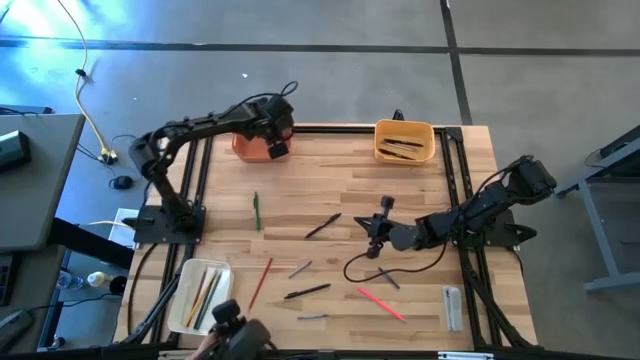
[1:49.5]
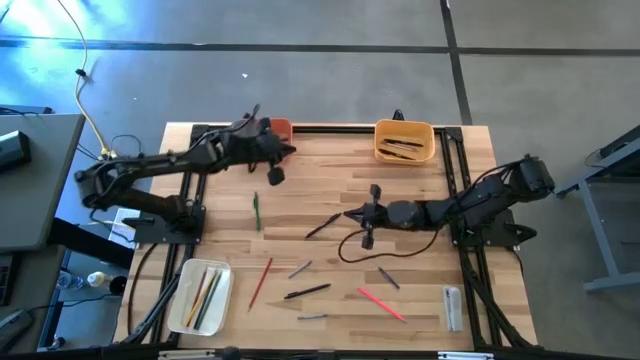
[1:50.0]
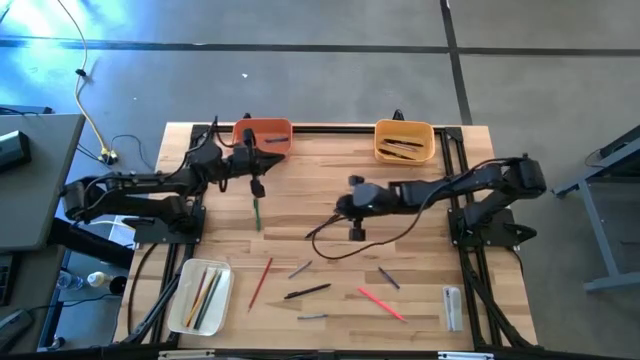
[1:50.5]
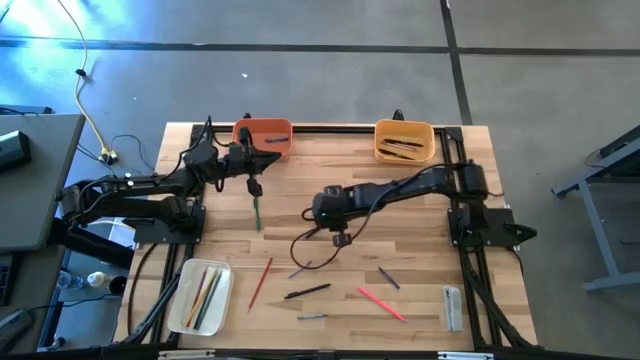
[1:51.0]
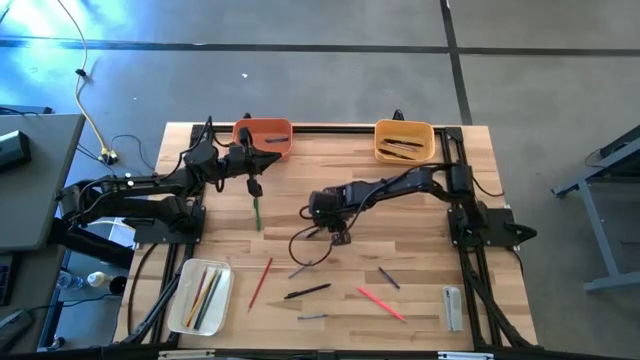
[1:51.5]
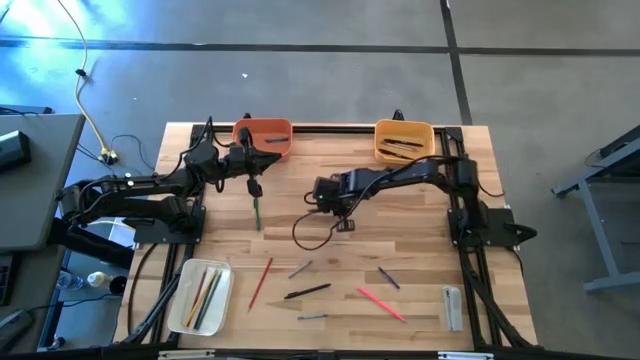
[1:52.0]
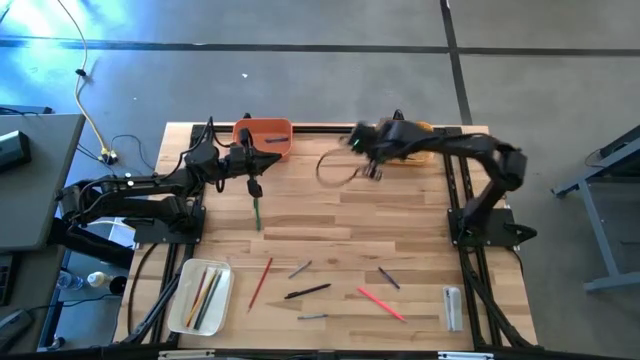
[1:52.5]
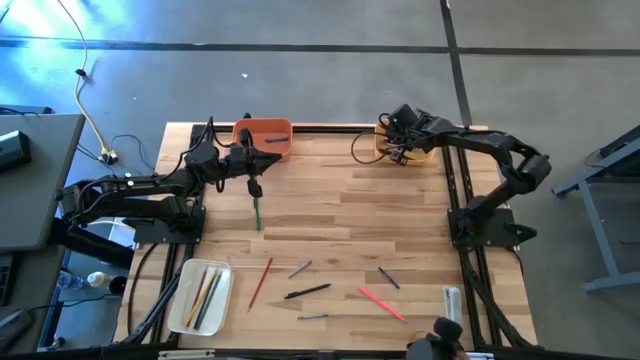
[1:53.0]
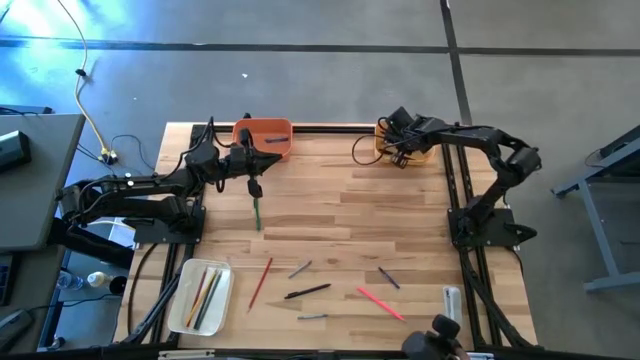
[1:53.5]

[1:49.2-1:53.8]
Task: Sort crayons/erasers/pens/pencils in bins
Put the black pen into the yellow bin

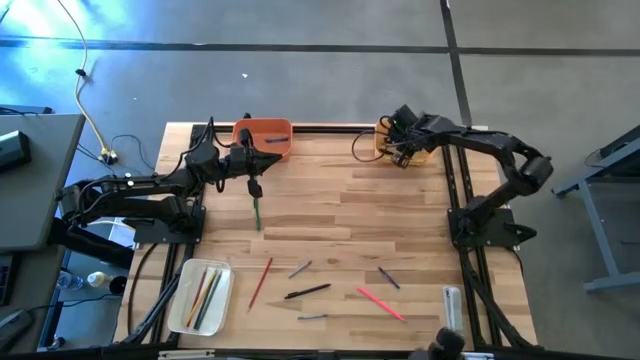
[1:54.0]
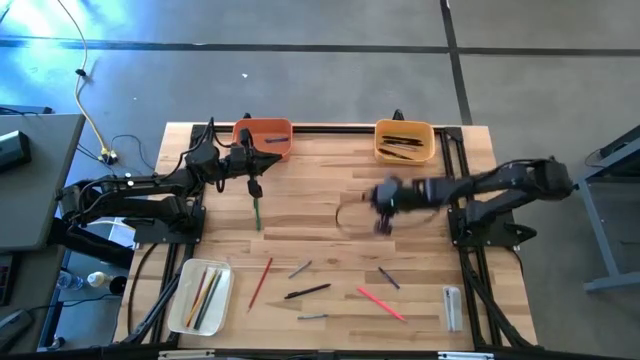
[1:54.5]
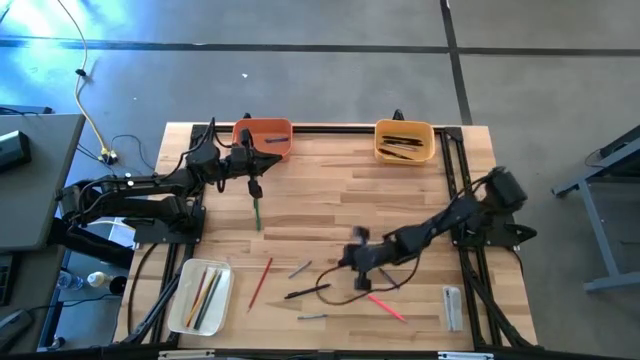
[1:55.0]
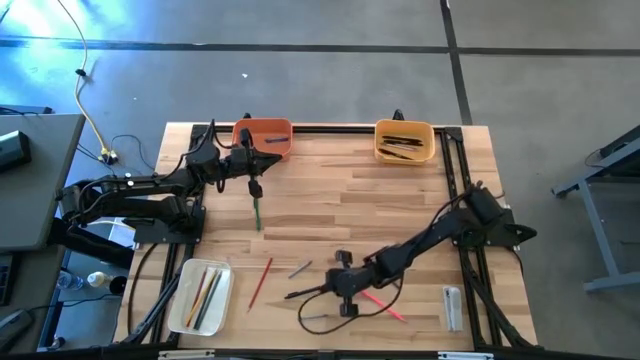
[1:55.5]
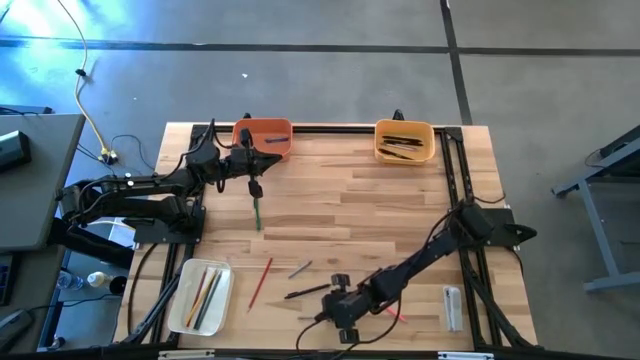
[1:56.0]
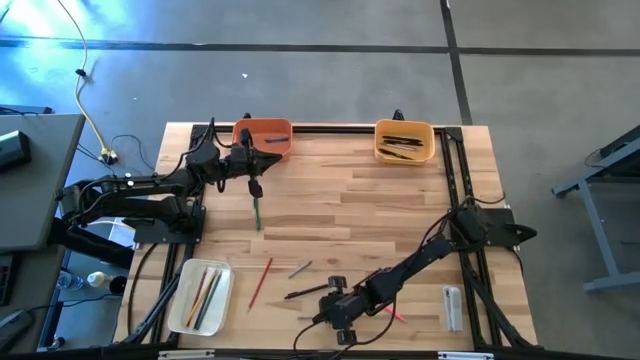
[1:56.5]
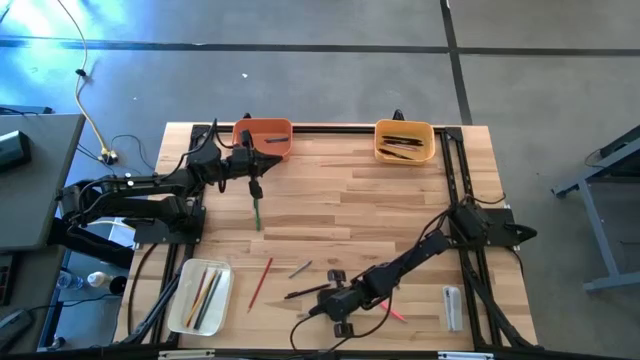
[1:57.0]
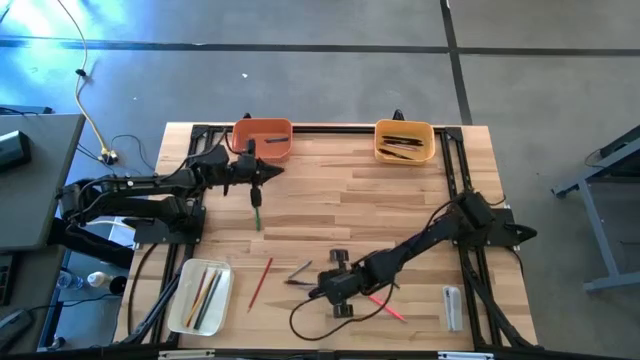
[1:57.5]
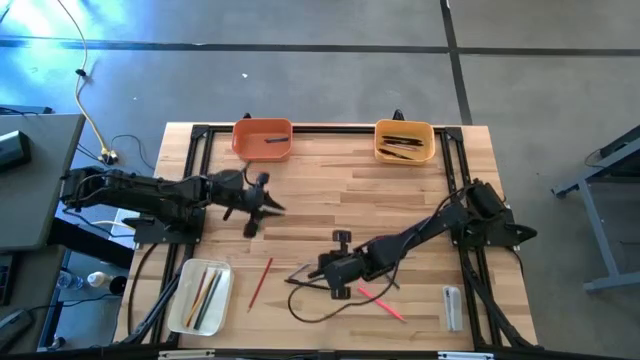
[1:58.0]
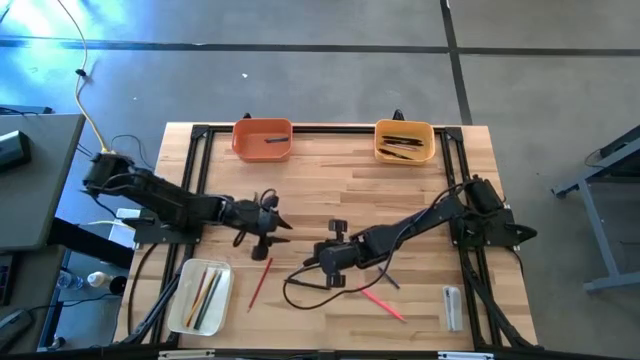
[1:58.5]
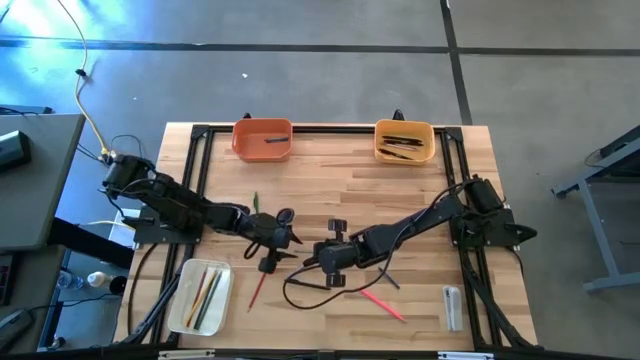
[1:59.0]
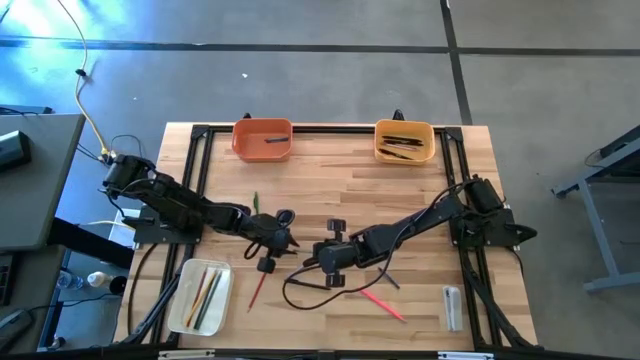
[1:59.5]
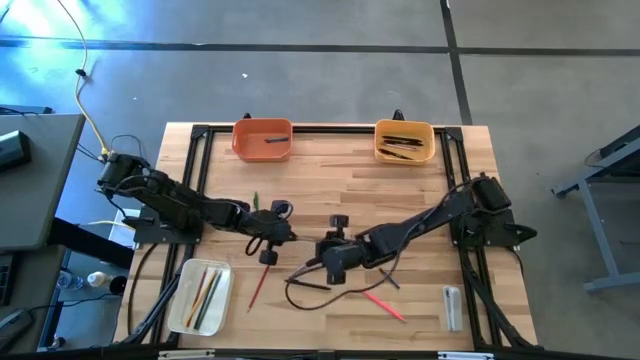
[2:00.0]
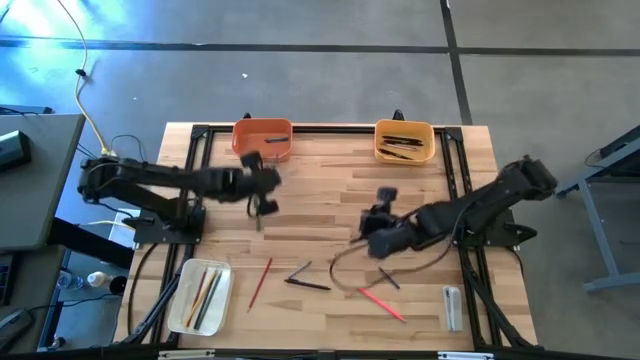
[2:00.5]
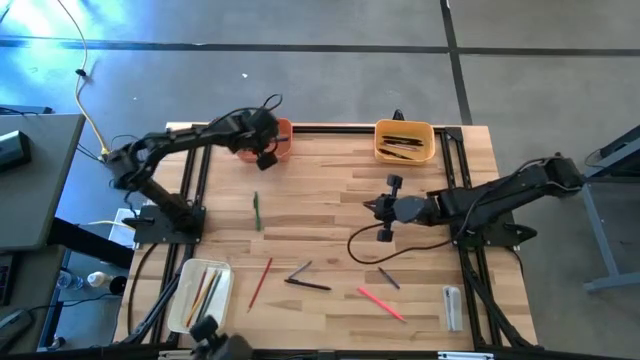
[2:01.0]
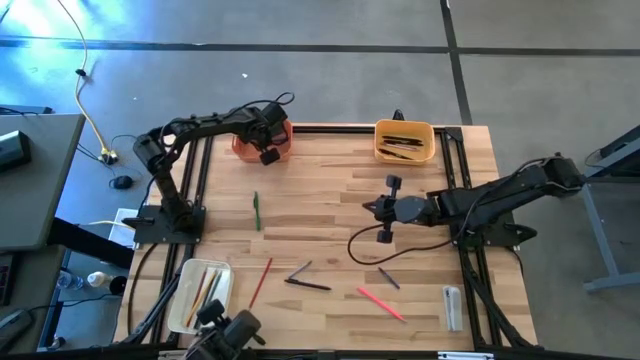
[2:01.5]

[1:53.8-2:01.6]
Put the gray crayon into the orange bin

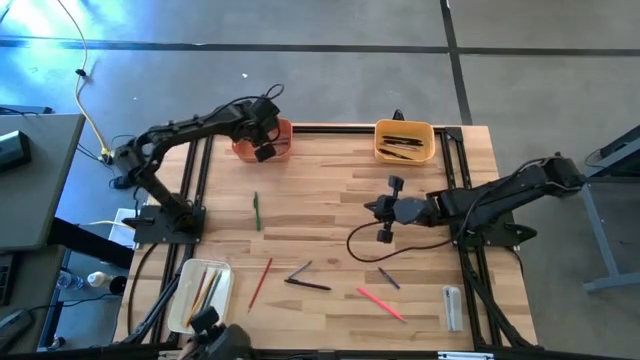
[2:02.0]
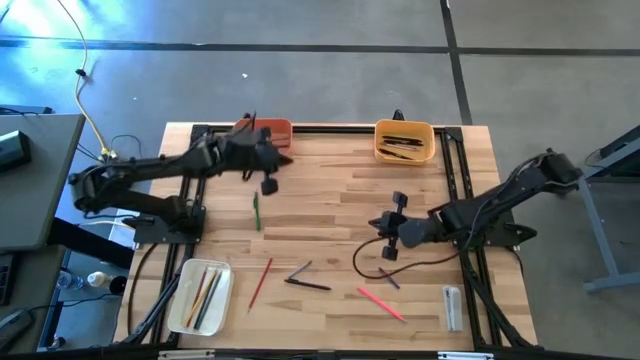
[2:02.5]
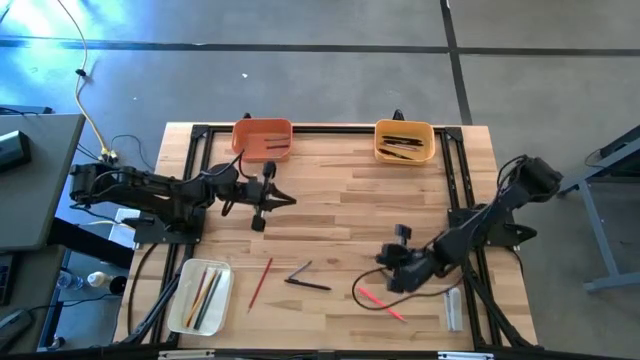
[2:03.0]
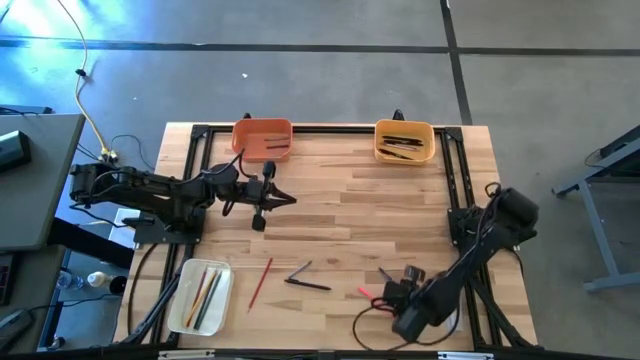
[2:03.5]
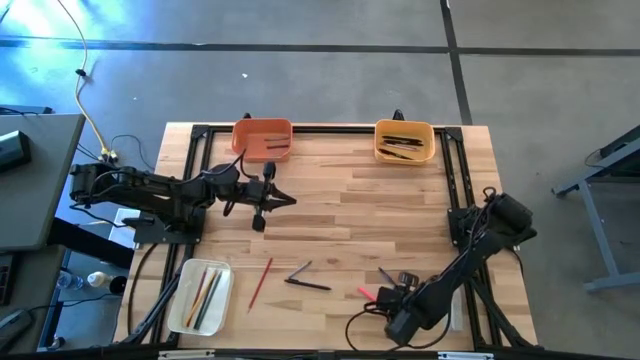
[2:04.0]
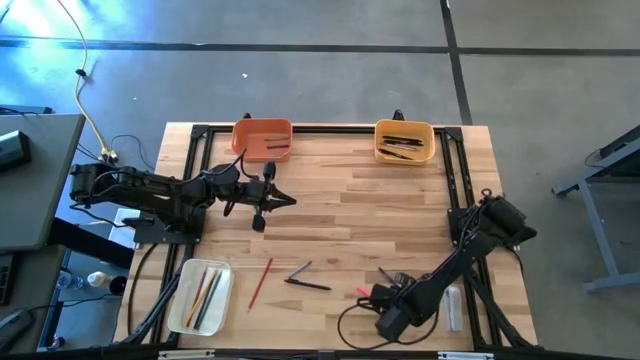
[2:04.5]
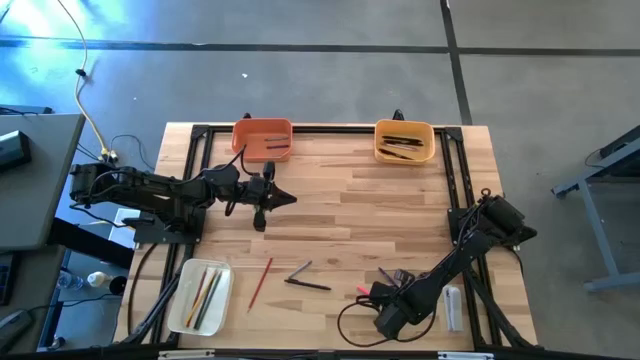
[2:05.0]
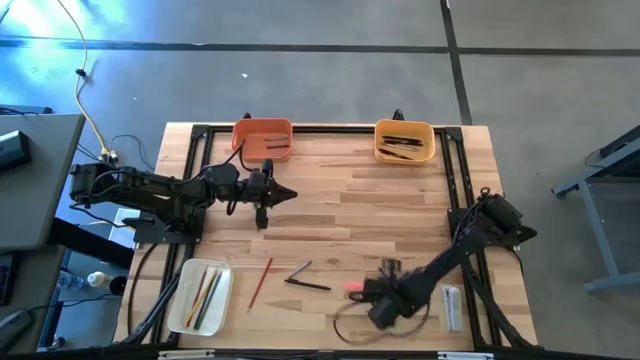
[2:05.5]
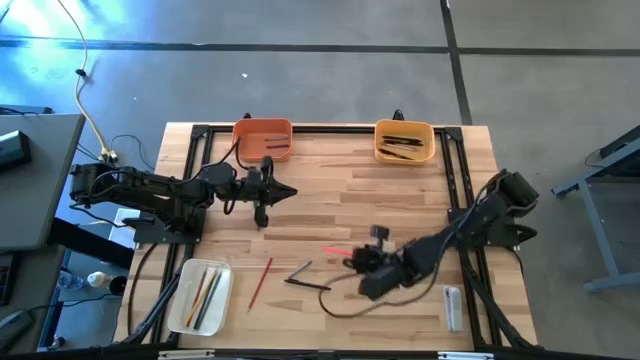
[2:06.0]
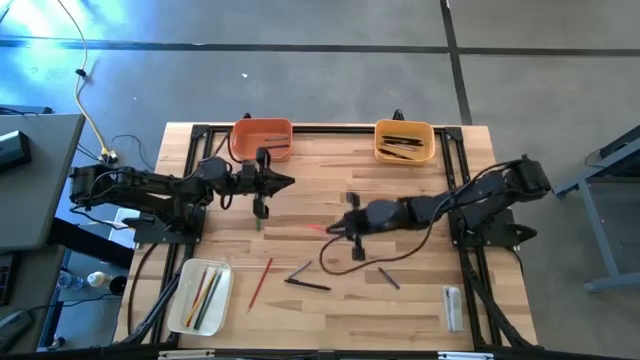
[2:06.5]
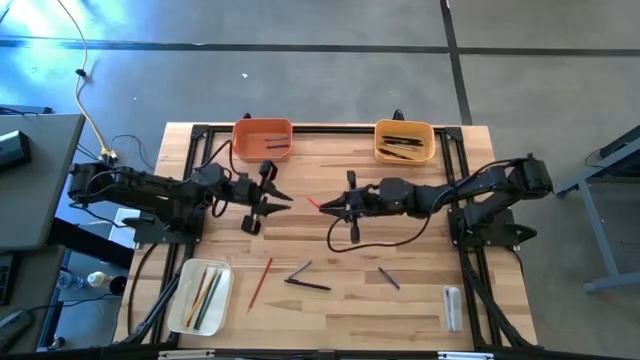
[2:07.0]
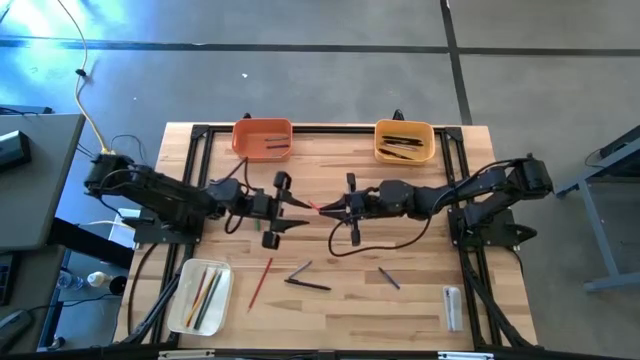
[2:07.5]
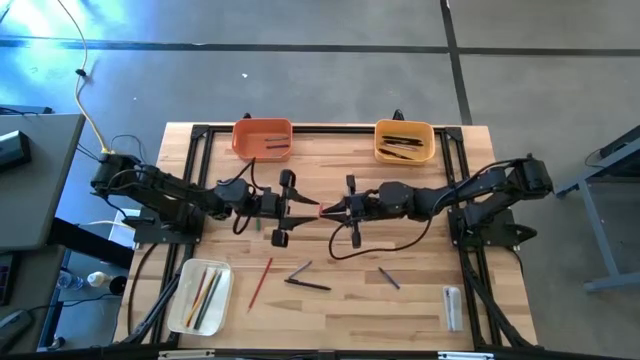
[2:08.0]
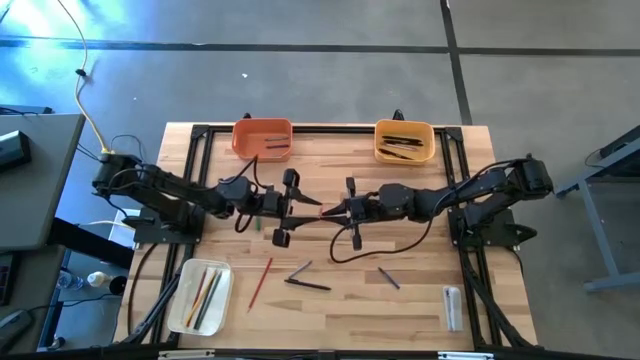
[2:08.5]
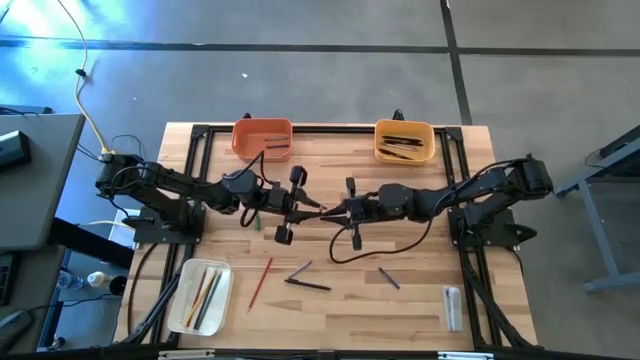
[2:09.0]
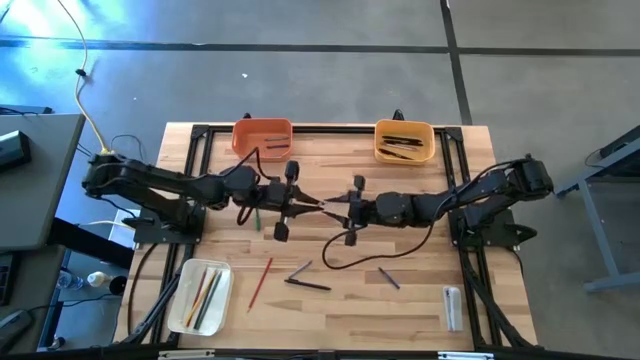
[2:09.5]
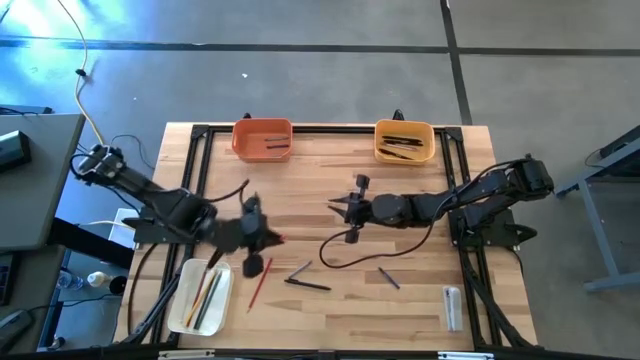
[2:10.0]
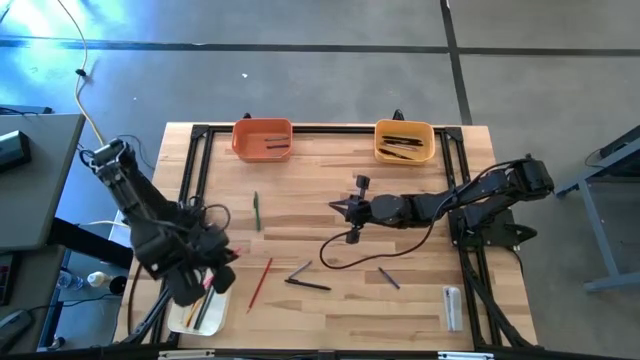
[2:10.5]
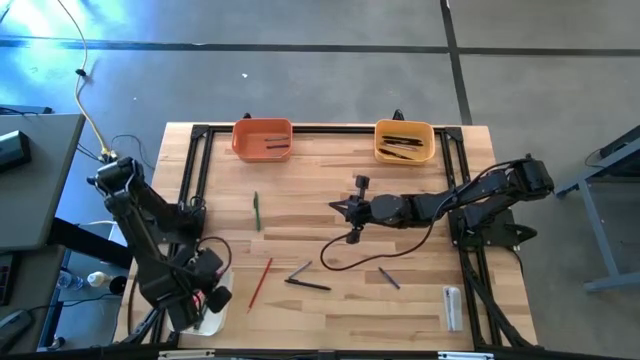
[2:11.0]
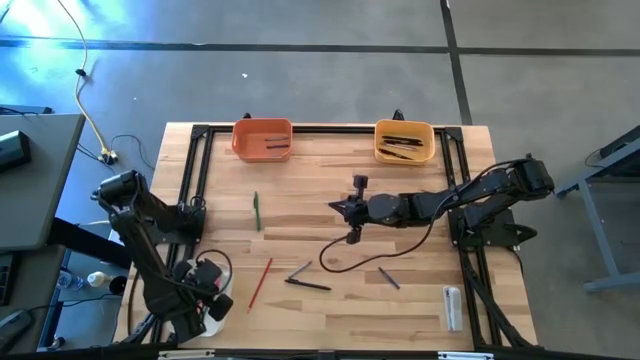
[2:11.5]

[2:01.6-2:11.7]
Put the pink colored pencil into the white bin
